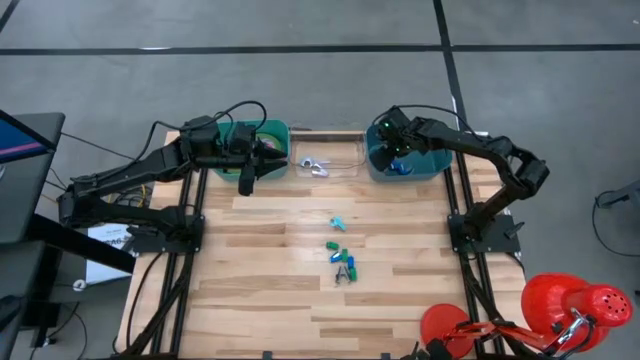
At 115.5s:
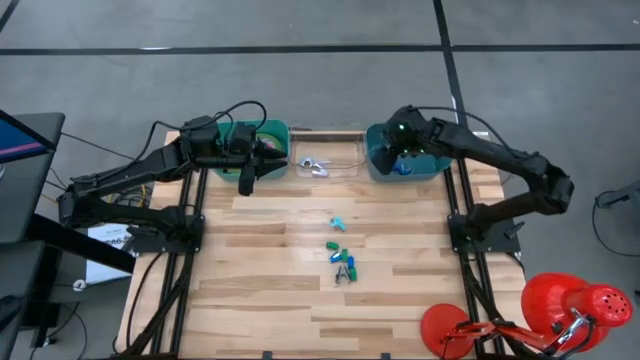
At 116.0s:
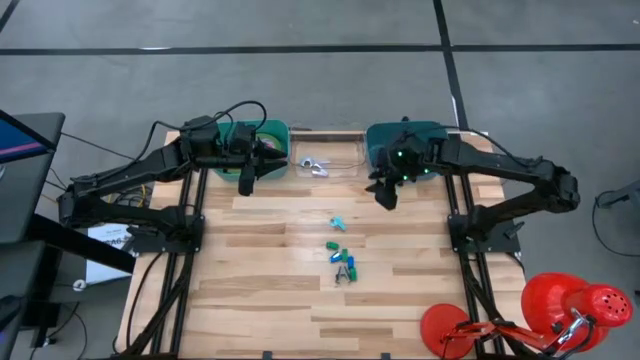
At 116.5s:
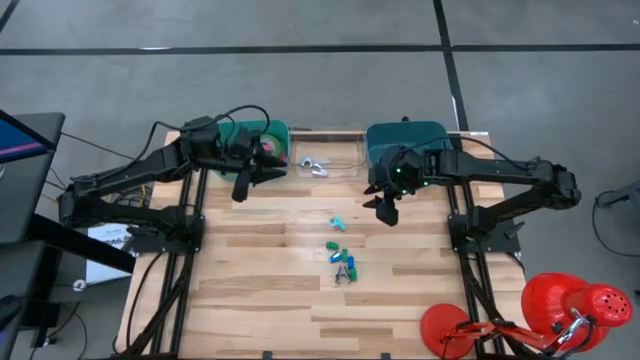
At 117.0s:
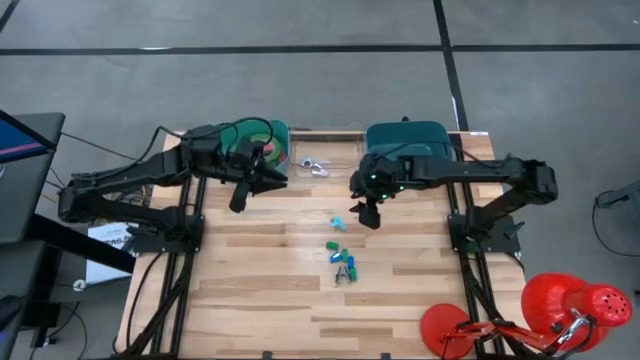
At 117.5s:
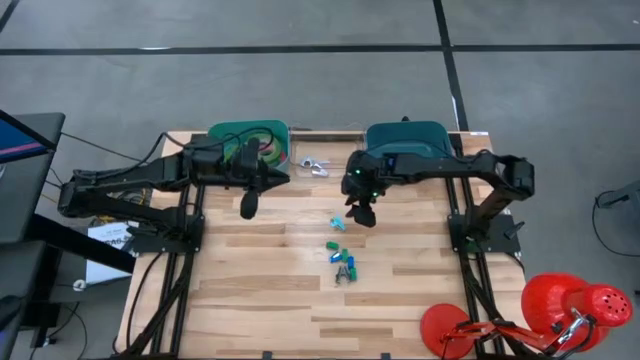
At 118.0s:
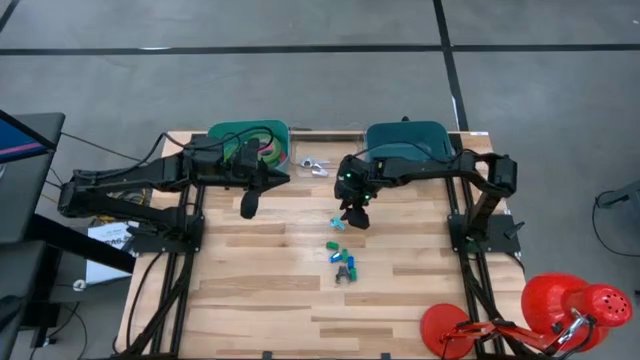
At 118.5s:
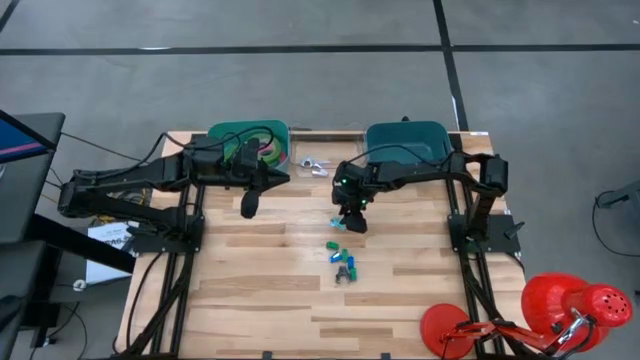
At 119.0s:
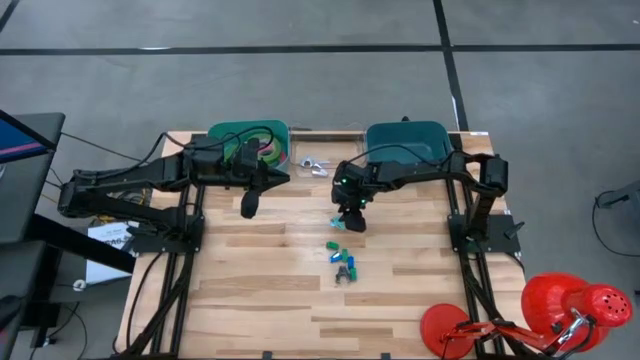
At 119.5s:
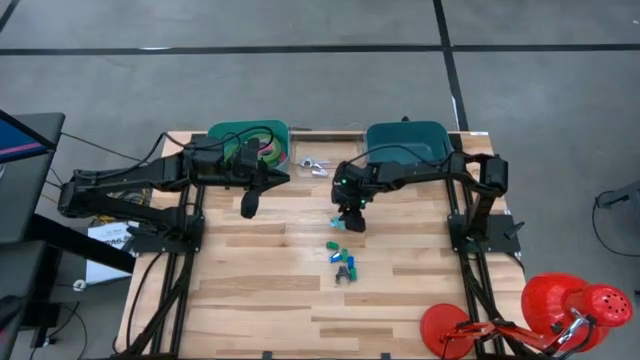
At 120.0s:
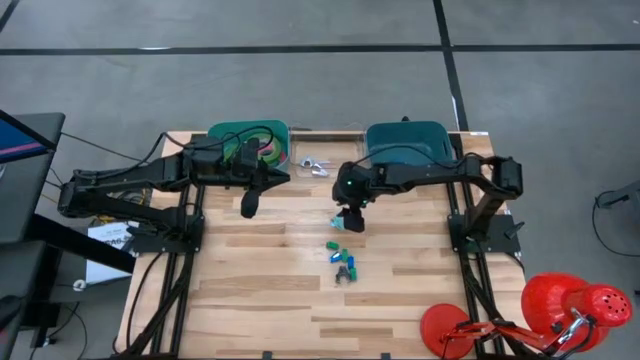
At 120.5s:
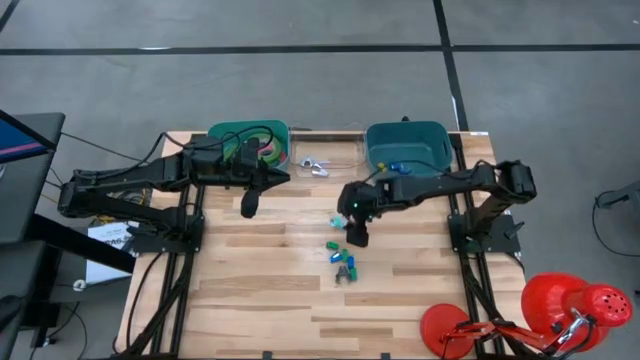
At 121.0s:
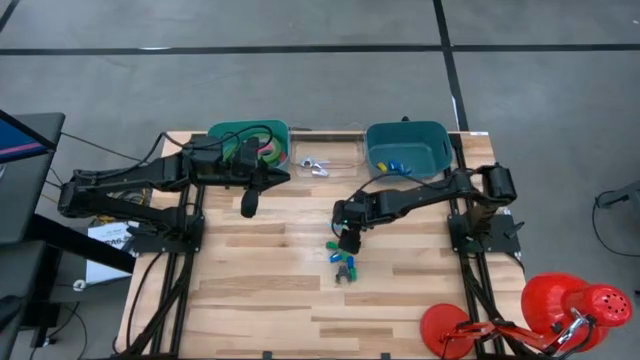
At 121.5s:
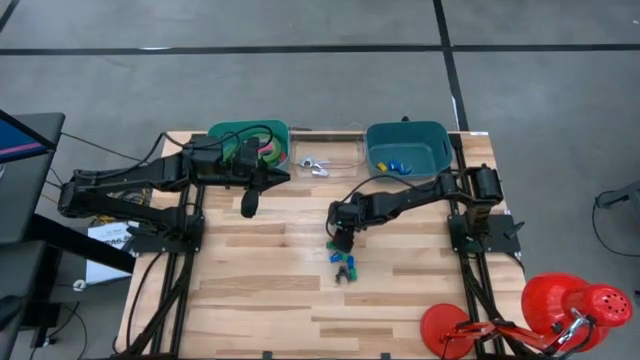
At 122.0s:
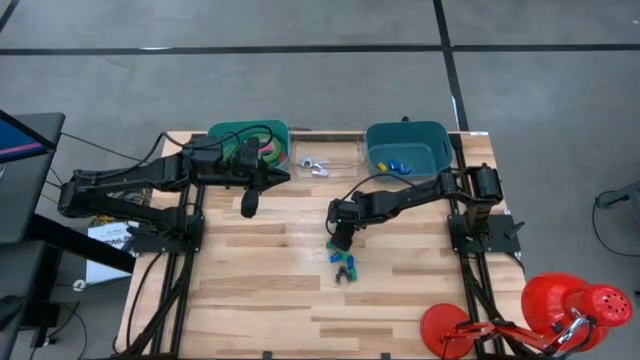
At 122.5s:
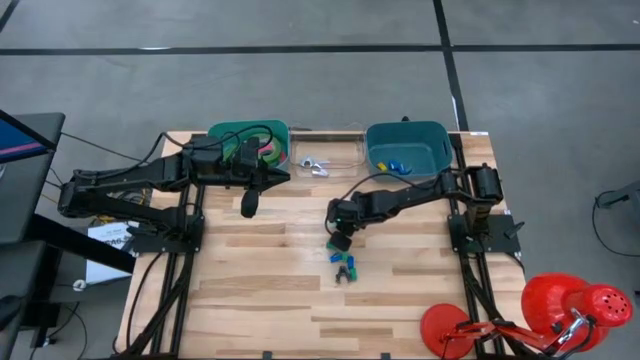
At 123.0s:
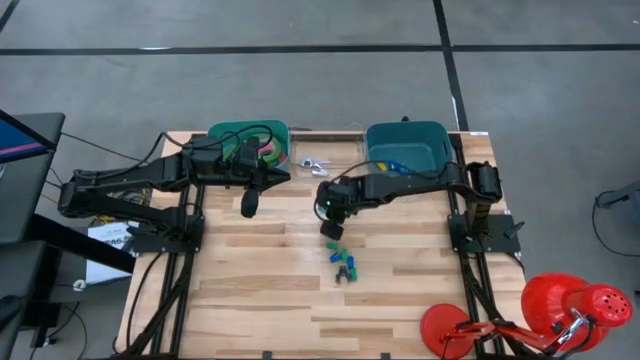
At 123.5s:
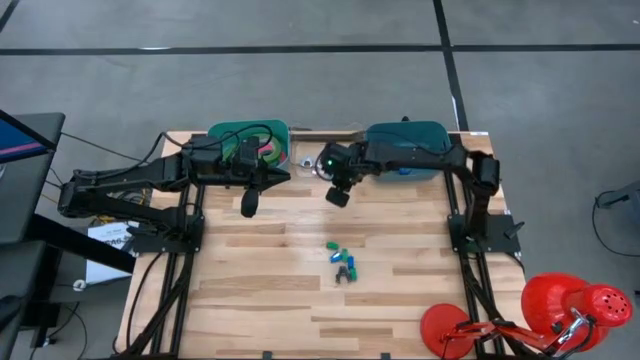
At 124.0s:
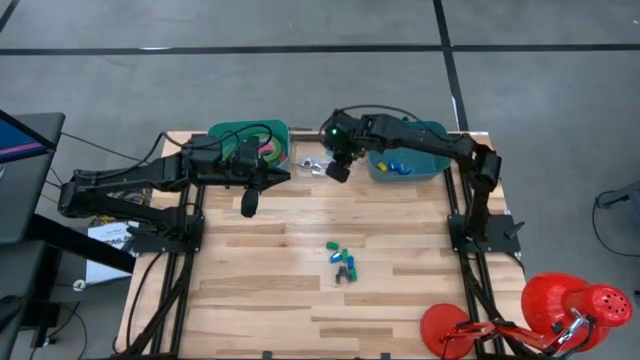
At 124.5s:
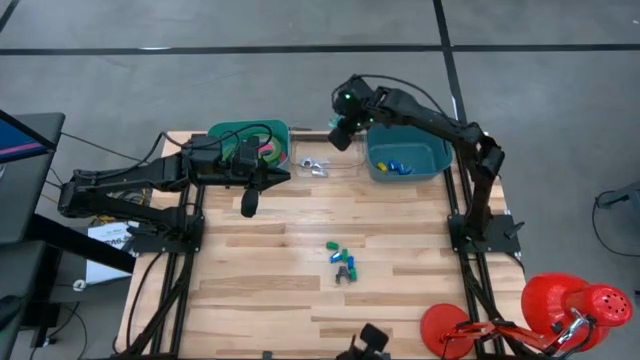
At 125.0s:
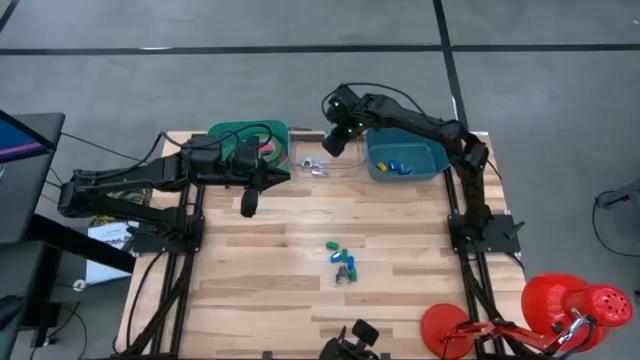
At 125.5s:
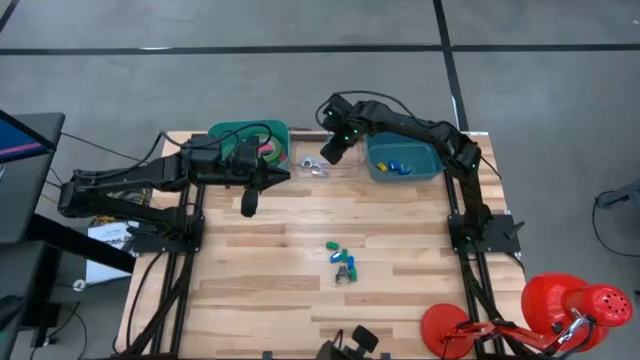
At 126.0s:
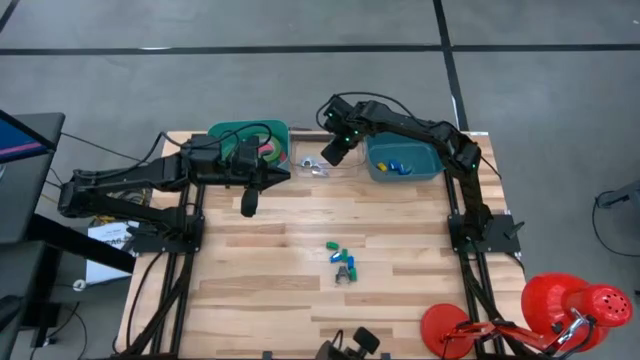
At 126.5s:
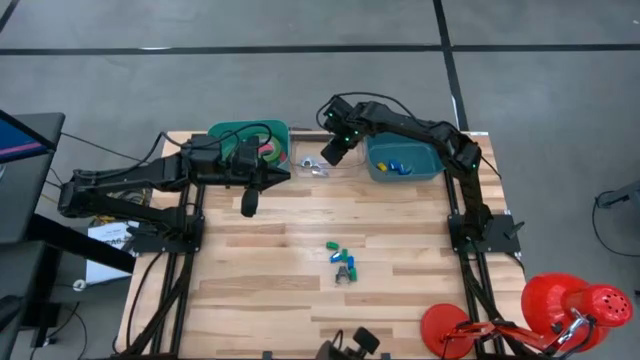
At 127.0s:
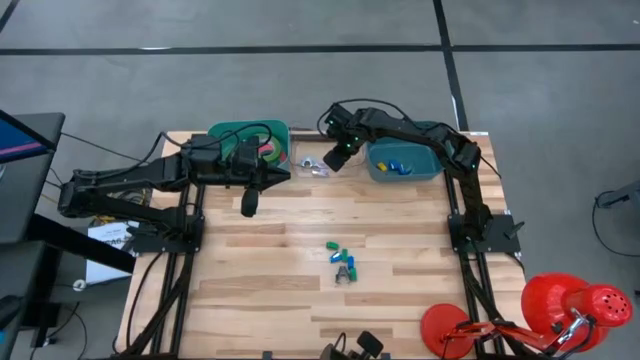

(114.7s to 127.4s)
Task: Pick and place Stapler, Stapler remover, tape
Put the light blue staple remover into the transparent bin

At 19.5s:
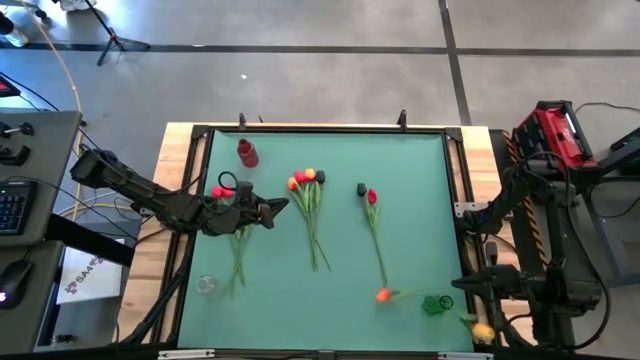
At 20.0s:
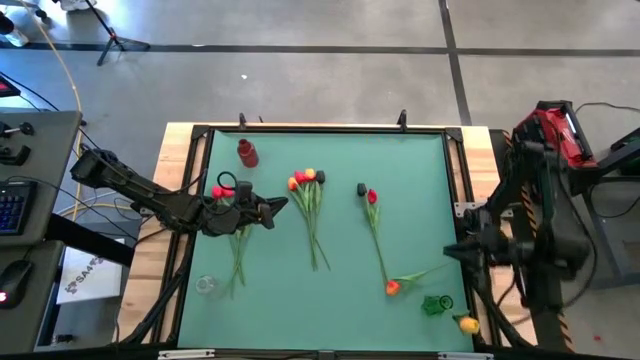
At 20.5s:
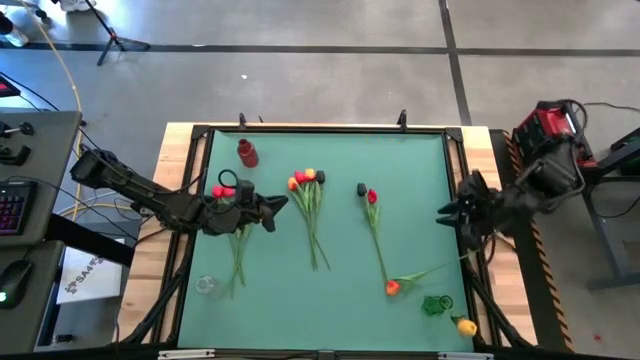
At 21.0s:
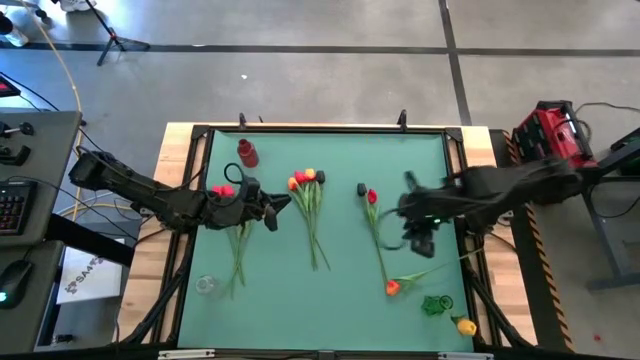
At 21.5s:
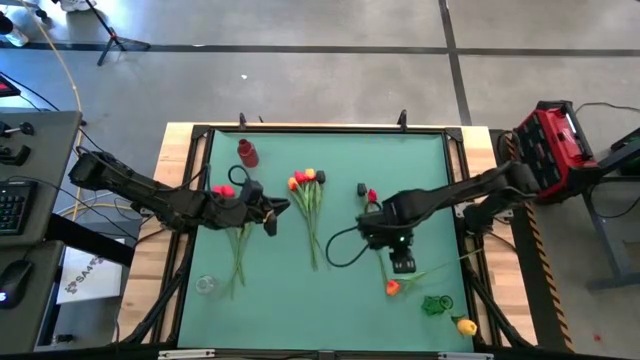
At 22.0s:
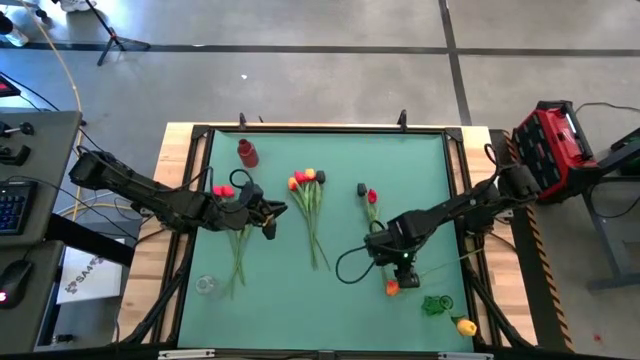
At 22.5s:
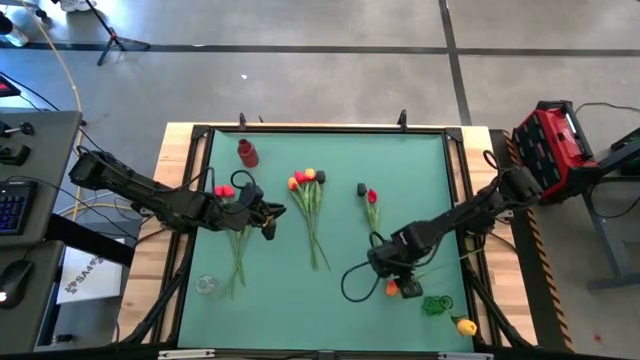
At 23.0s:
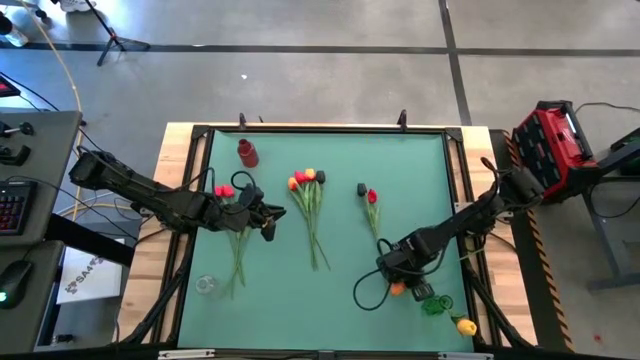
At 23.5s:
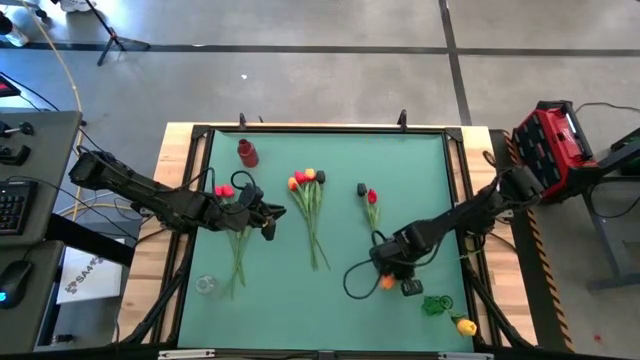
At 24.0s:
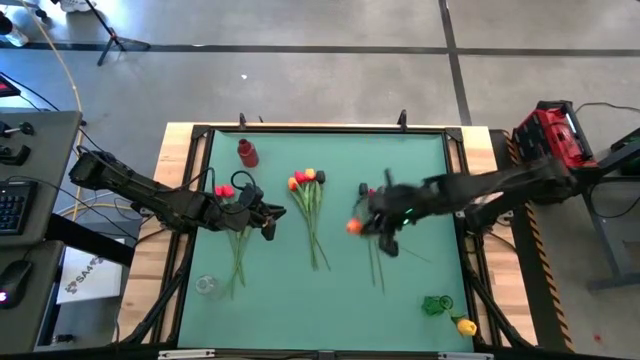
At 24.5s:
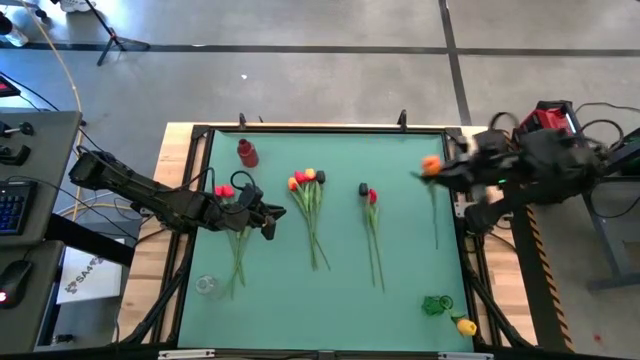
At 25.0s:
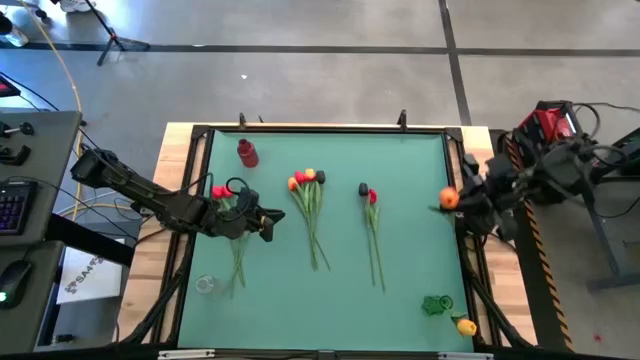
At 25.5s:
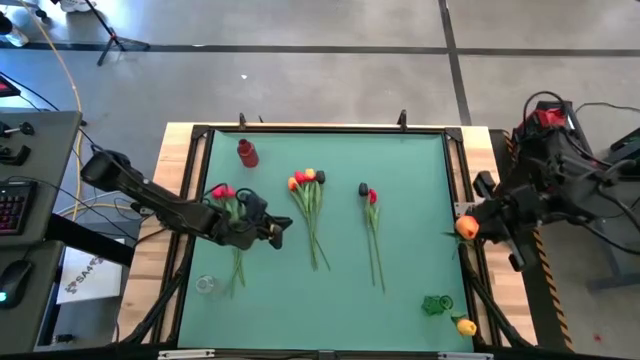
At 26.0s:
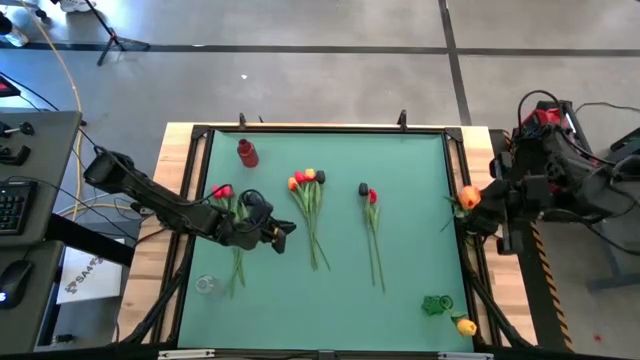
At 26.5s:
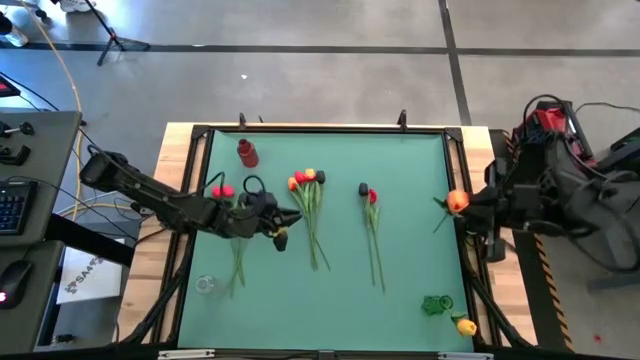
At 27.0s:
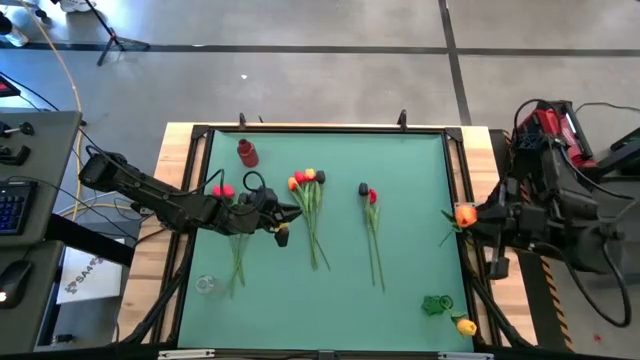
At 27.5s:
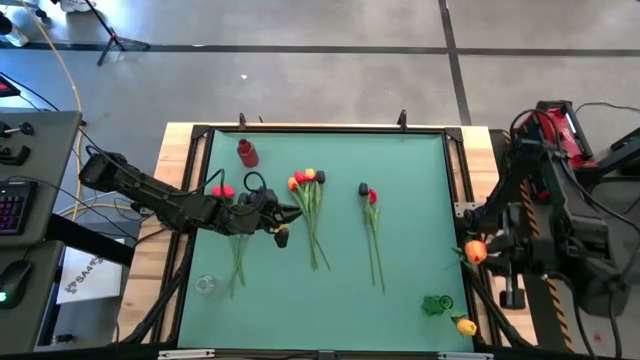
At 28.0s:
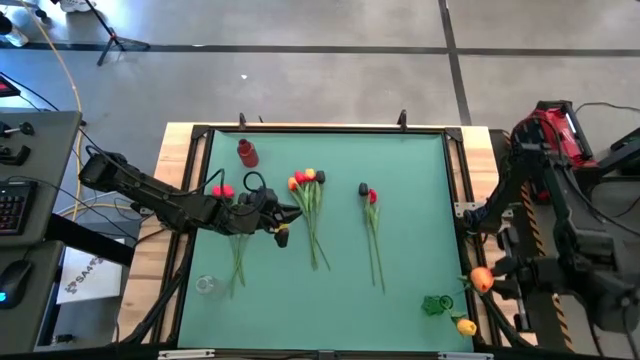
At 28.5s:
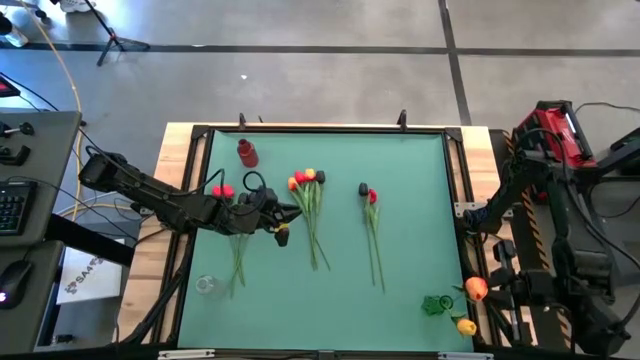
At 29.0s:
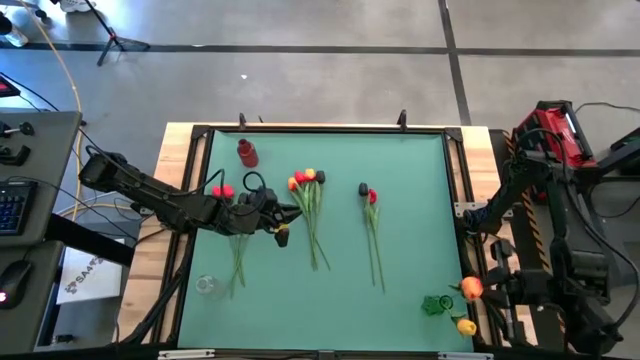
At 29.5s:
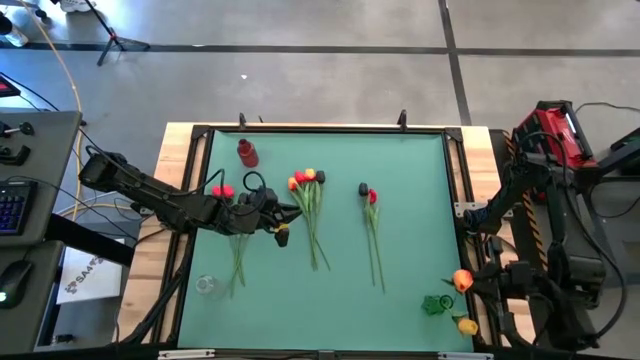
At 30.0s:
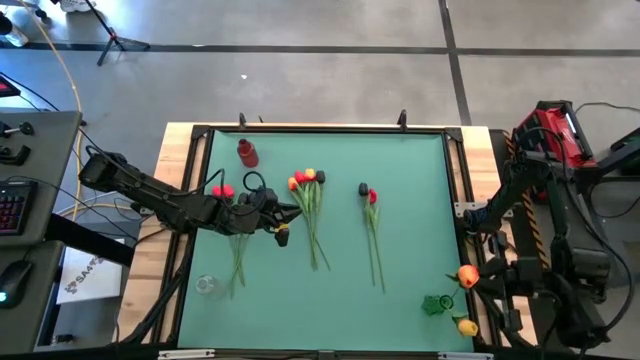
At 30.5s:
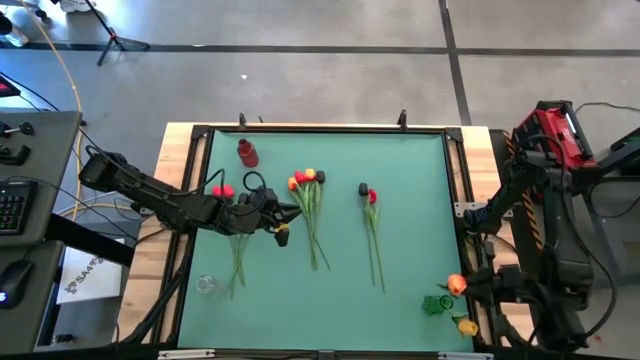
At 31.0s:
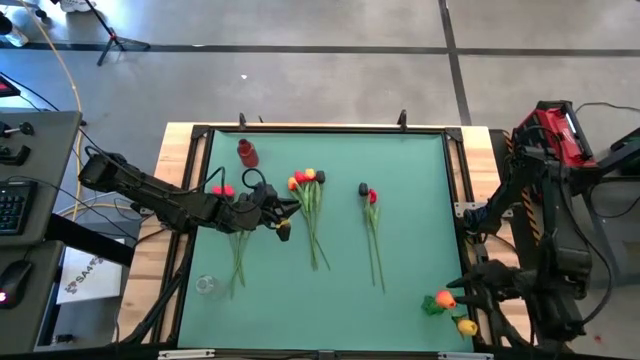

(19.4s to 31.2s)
Task: Sort flowers into vase by color
Put the orange flower into the green vase
